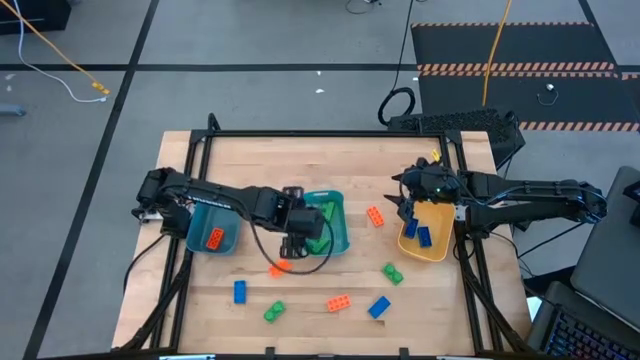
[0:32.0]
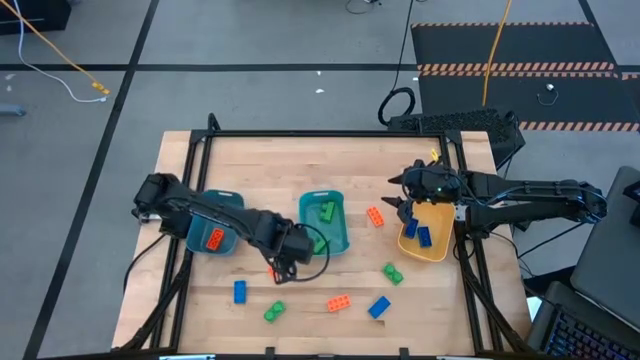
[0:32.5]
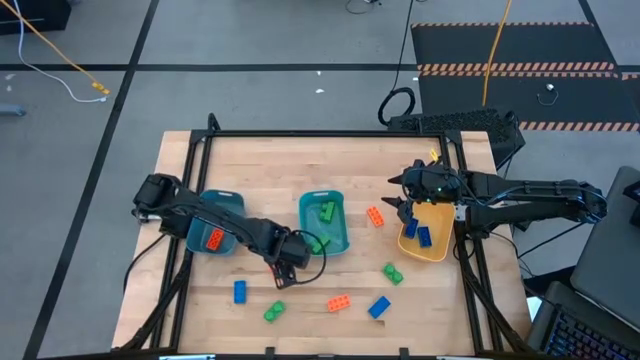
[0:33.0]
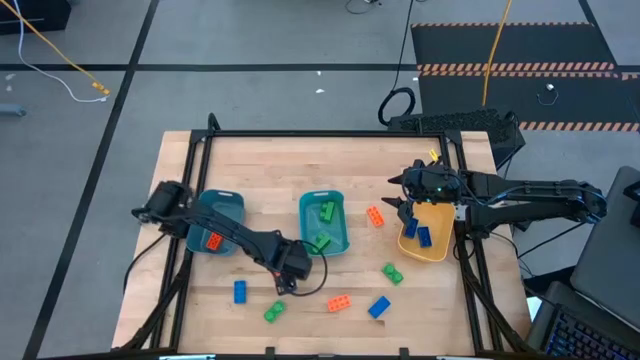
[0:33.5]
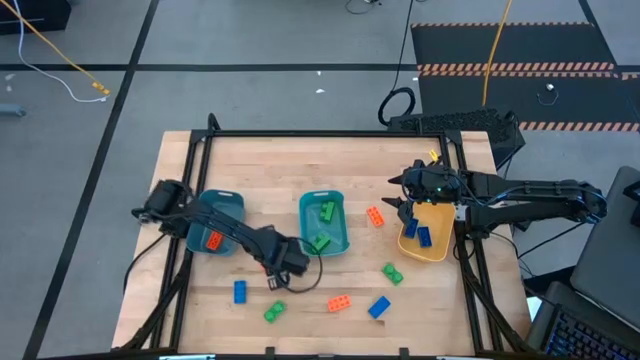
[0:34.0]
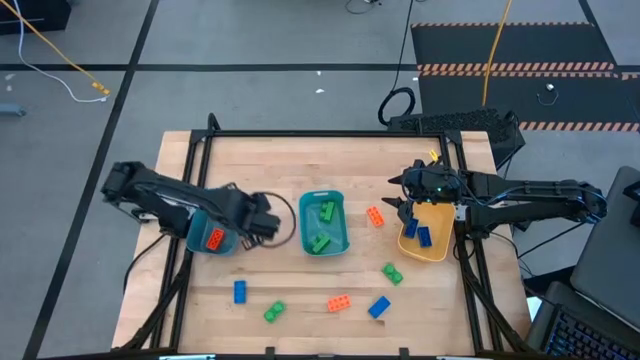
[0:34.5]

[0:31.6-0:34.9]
Task: Sort & place blocks by color
Put the orange game piece into the dark blue bin

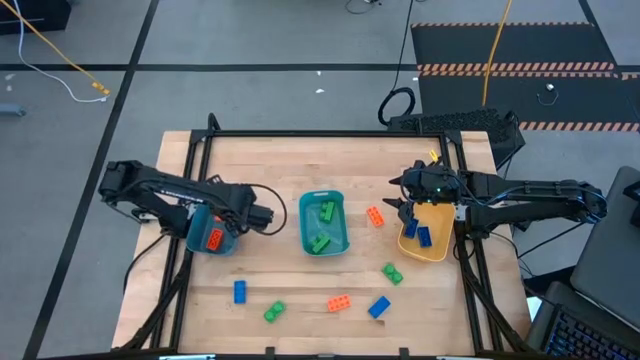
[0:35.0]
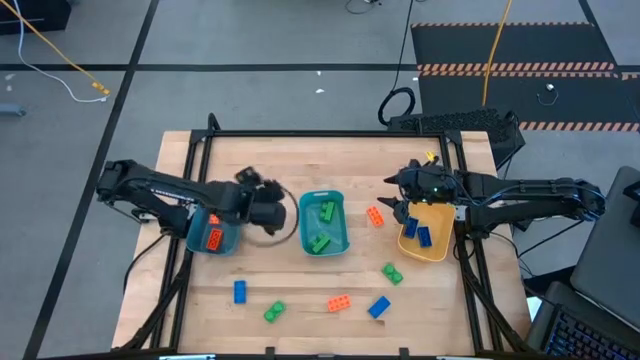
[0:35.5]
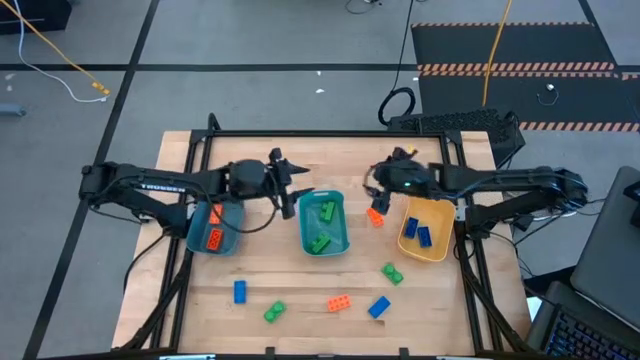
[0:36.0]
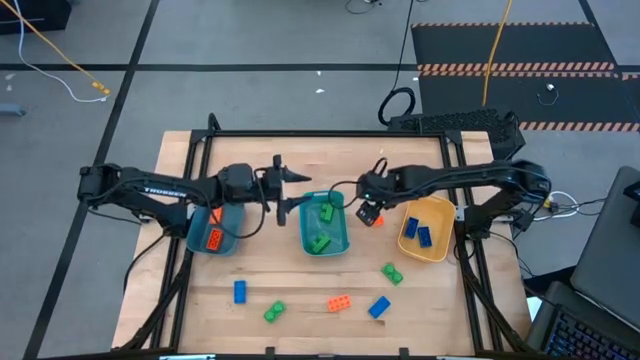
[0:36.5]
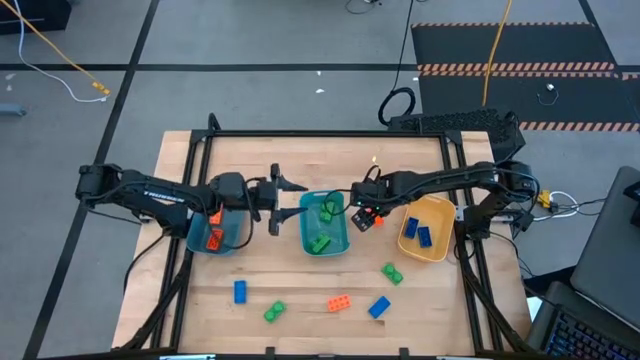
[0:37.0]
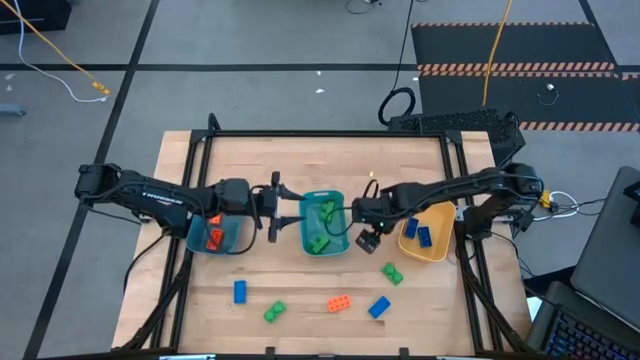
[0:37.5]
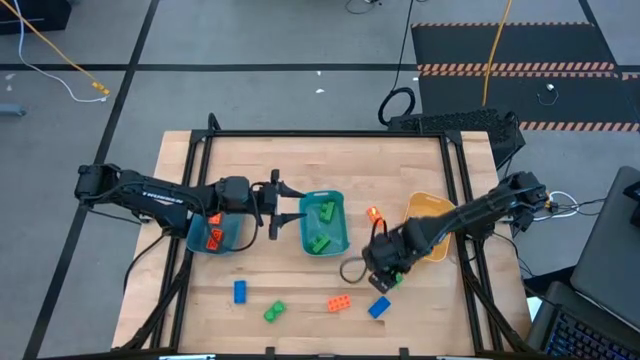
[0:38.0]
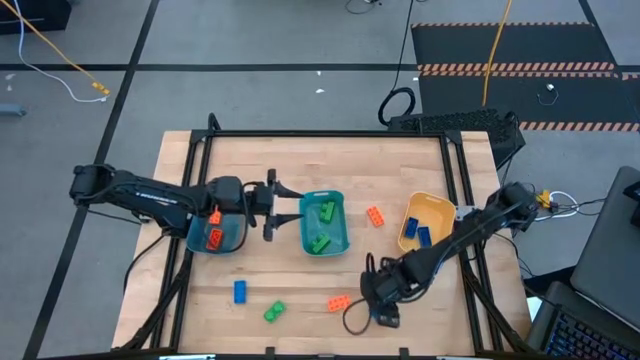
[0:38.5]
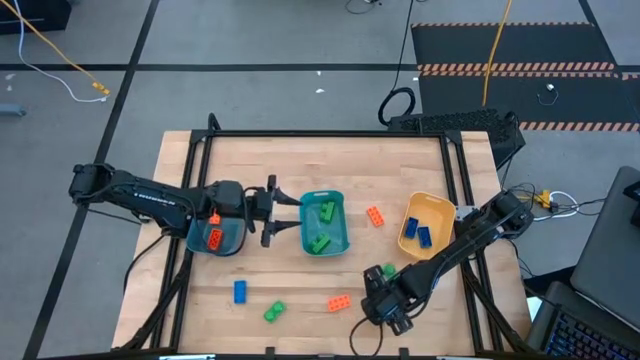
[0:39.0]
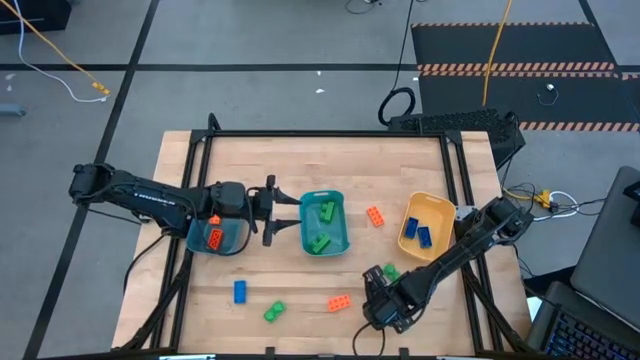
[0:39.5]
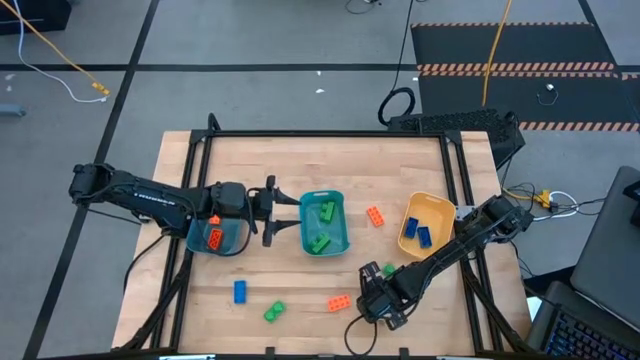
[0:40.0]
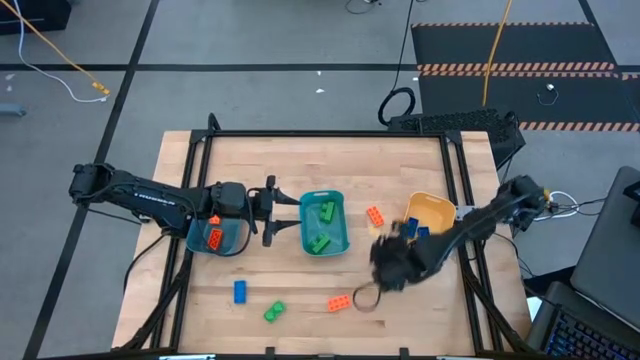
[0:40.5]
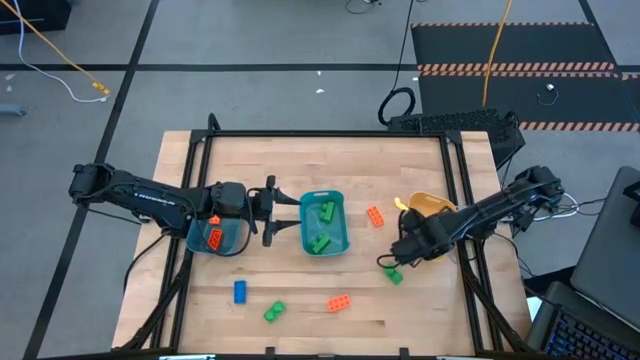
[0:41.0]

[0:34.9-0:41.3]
Put the blue game piece into the yellow bin

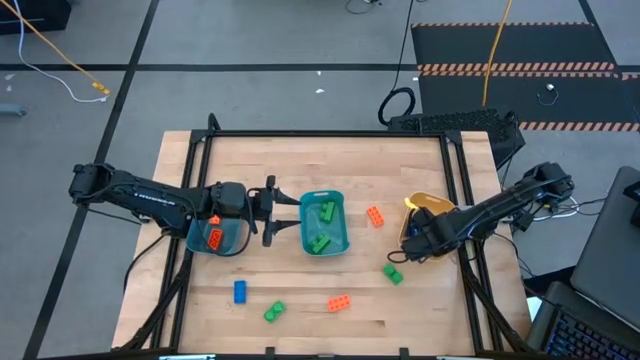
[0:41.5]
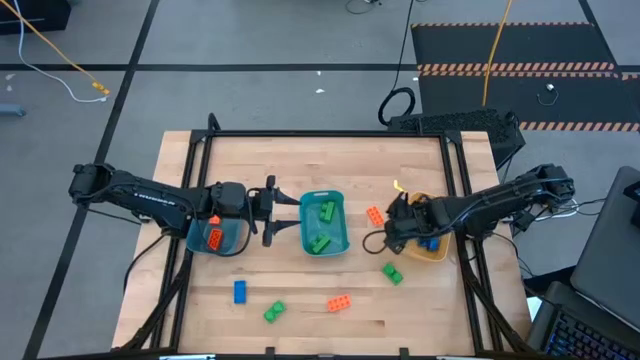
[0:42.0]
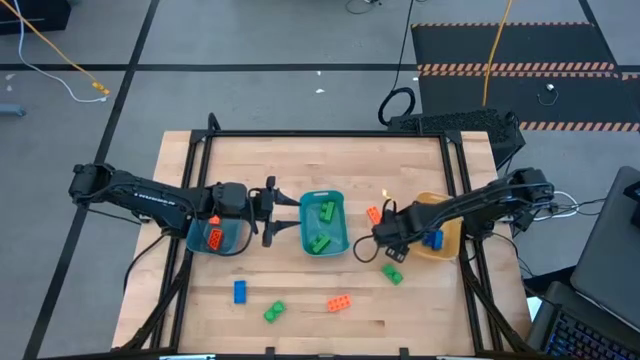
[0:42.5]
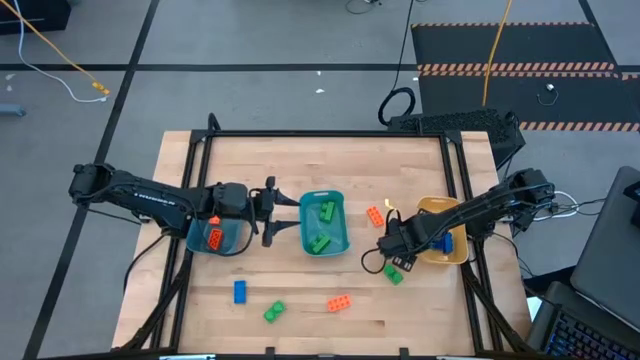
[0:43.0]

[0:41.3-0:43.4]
Adjust the yellow bin on the table

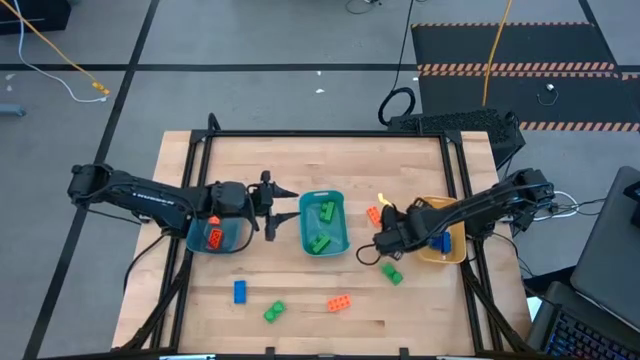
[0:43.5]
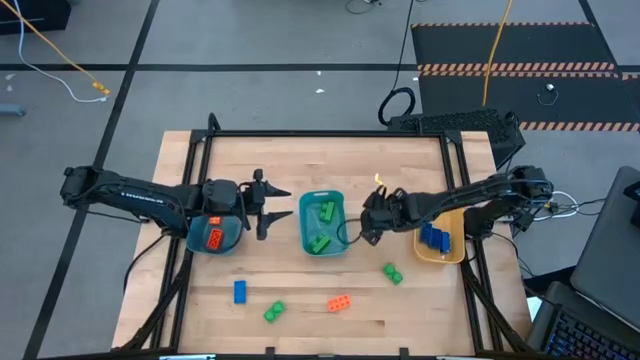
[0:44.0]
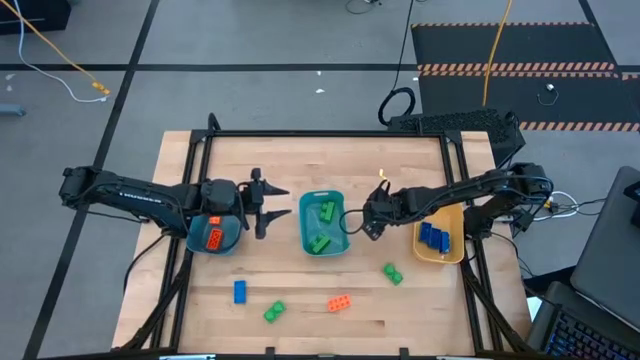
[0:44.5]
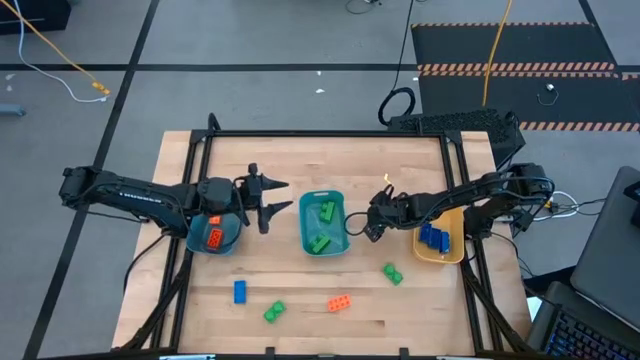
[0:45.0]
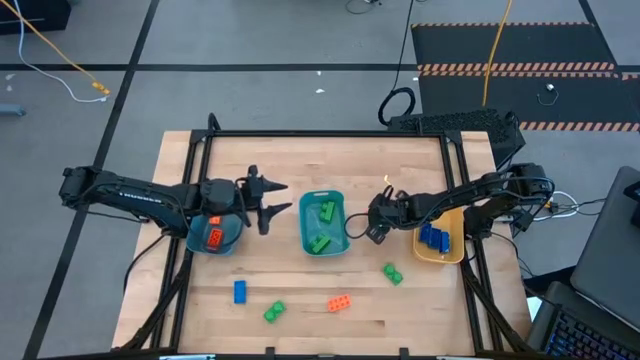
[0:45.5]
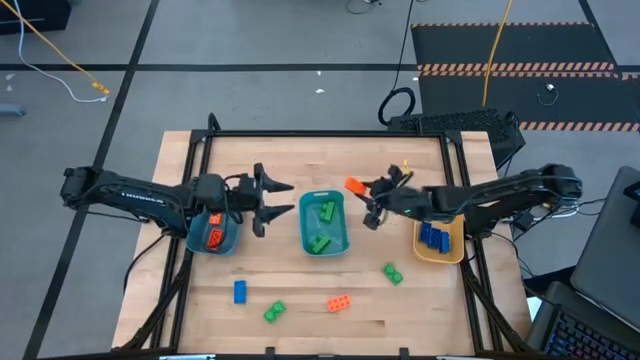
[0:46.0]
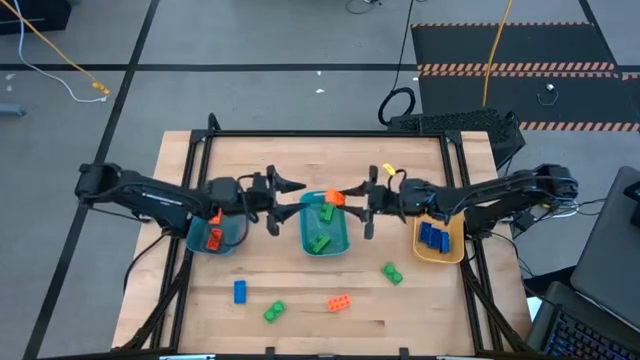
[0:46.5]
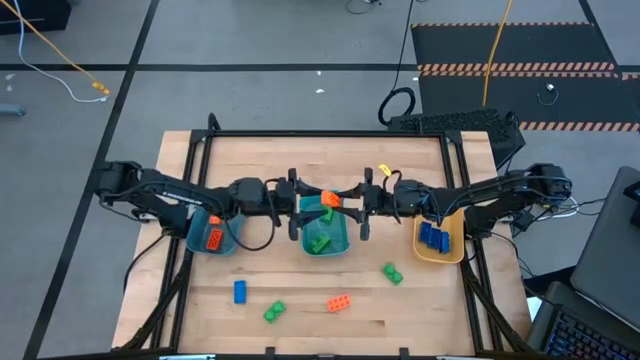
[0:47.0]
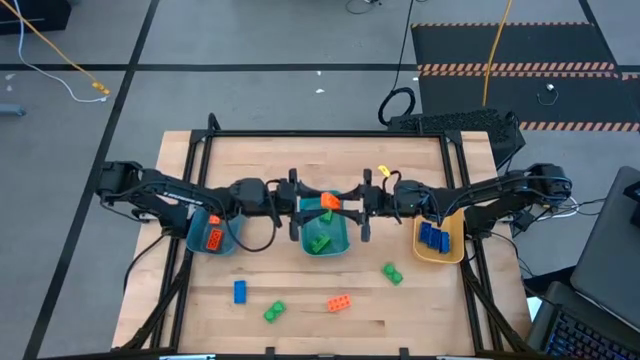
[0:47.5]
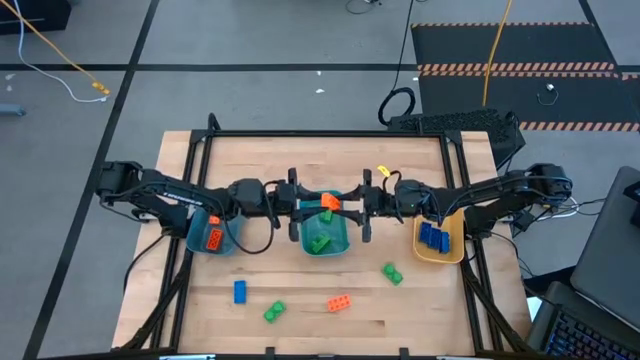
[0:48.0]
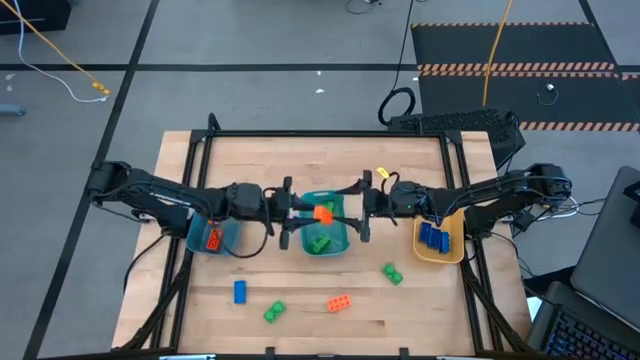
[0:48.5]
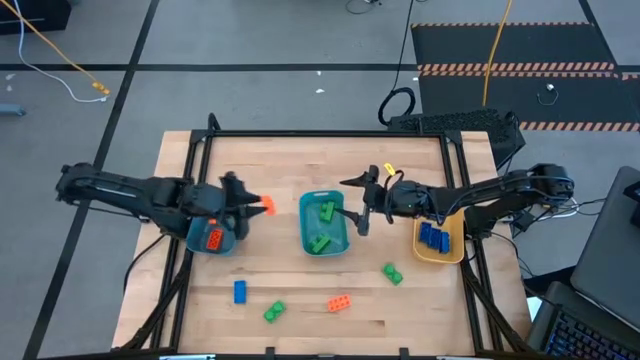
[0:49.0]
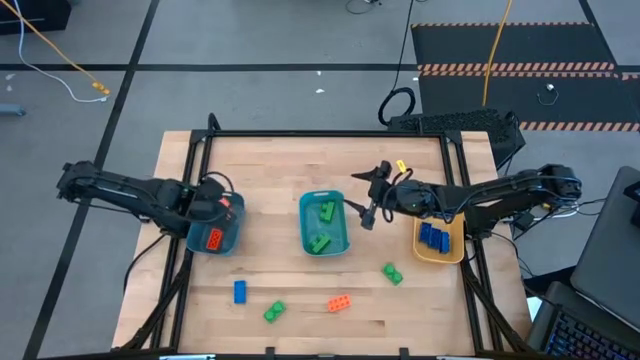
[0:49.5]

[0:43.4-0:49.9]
Put the orange game piece into the dark blue bin

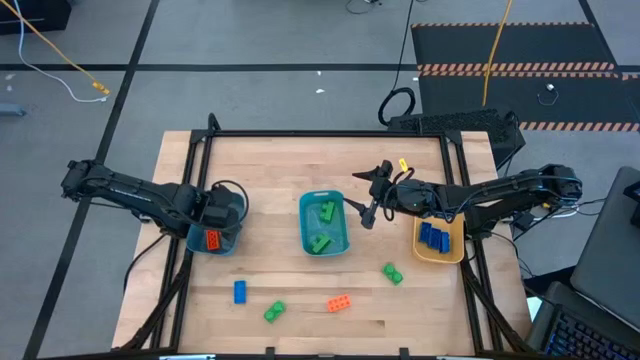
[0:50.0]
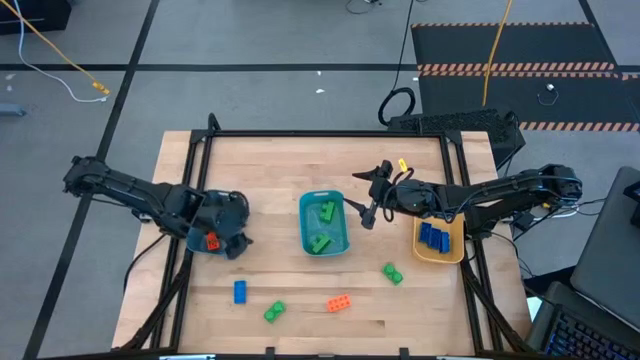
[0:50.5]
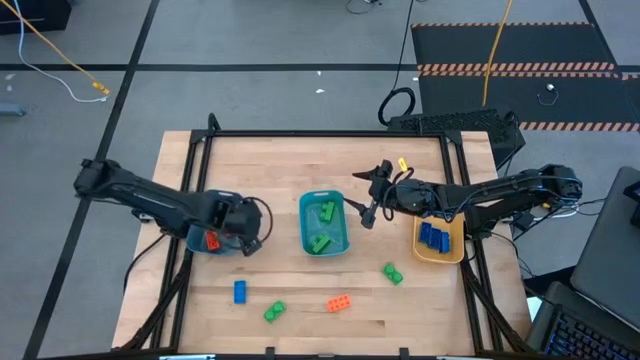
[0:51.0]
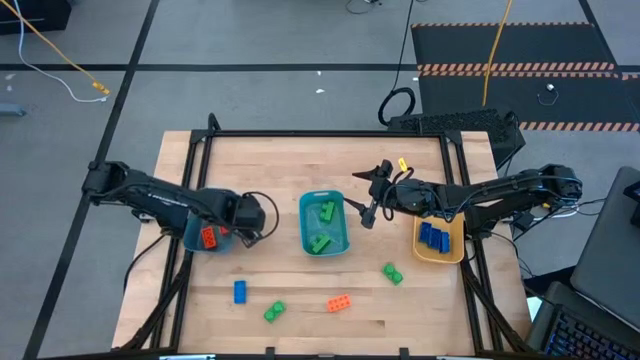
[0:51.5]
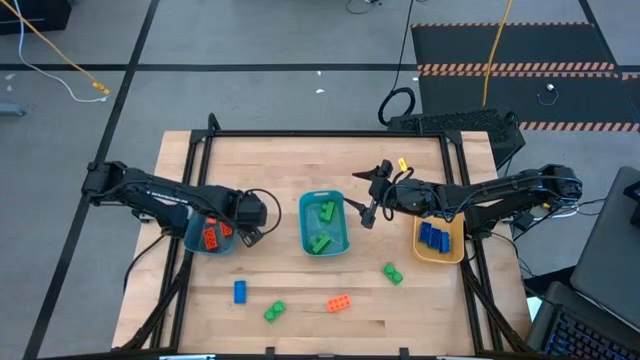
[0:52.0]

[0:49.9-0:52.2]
Adjust the dark blue bin

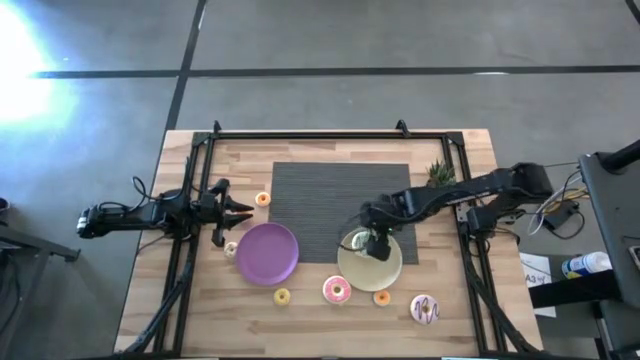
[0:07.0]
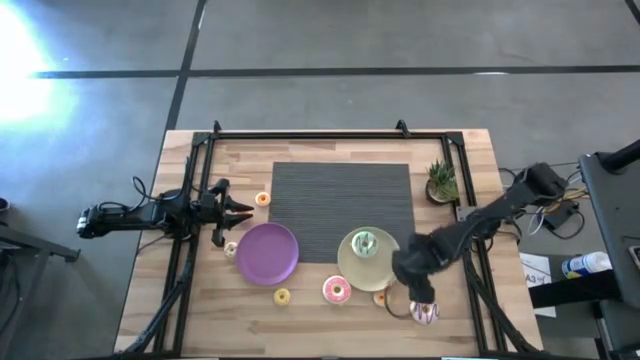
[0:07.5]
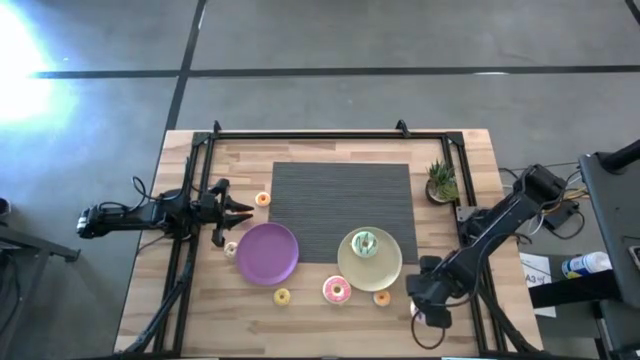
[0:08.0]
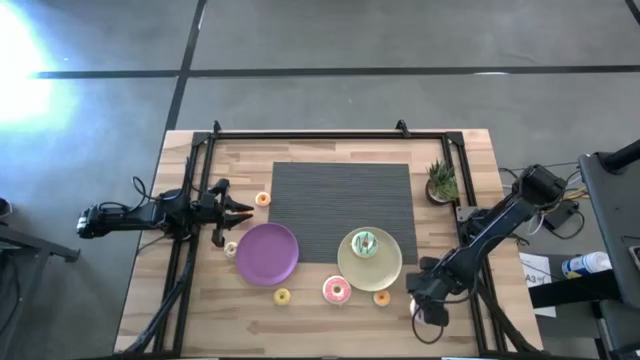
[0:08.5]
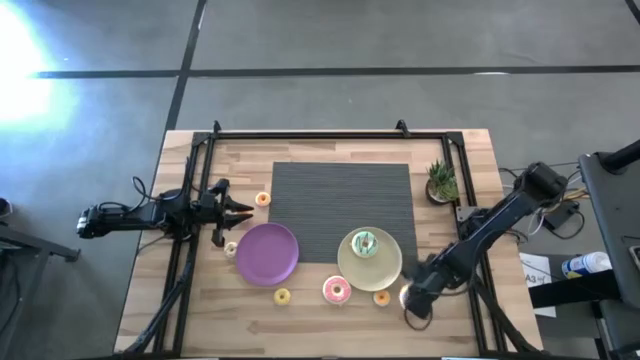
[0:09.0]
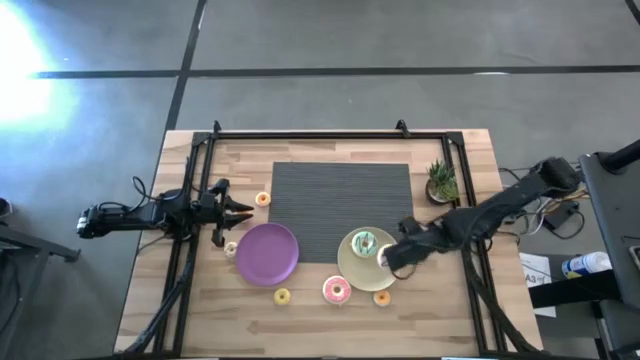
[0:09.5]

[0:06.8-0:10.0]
Task: Pick & Place donuts
Put the large violet donut on the brown plate
